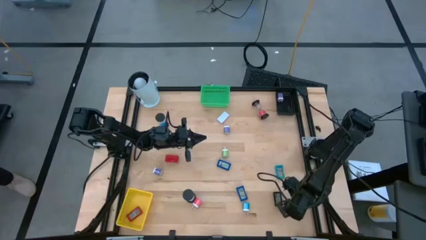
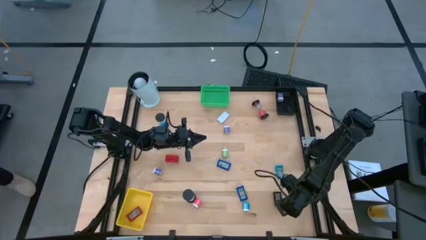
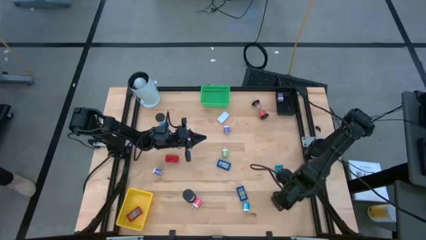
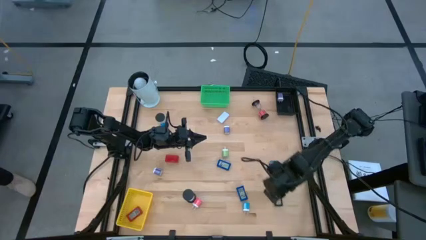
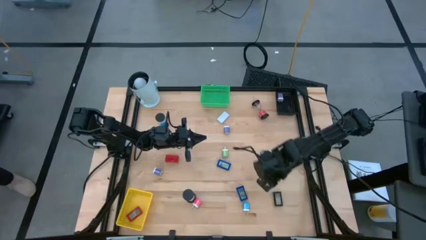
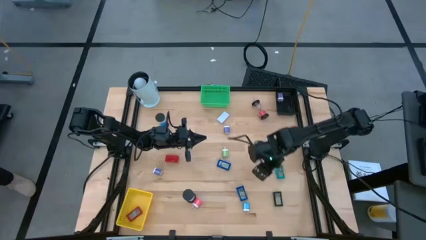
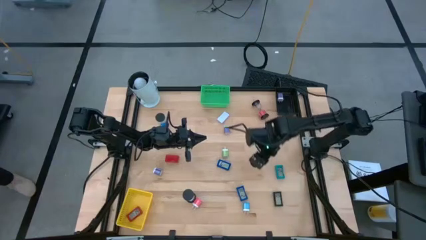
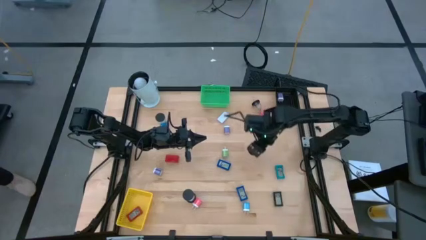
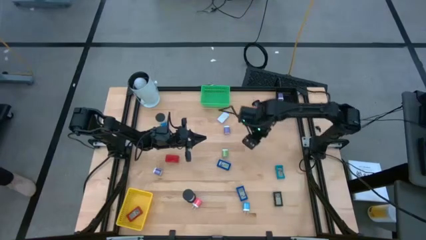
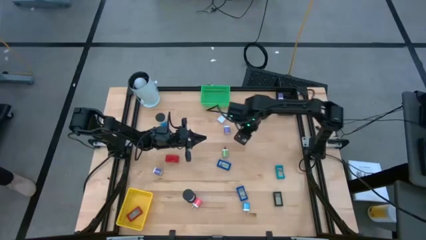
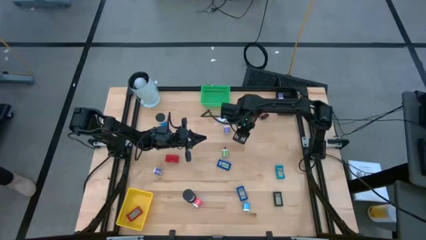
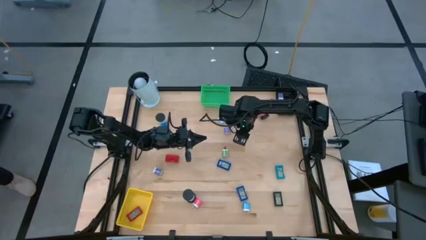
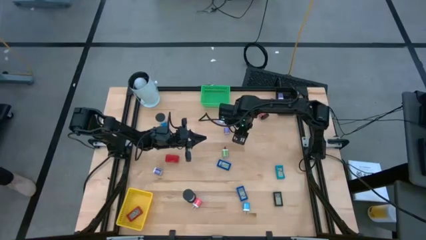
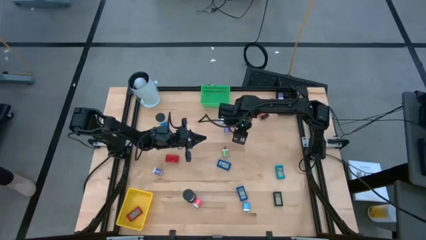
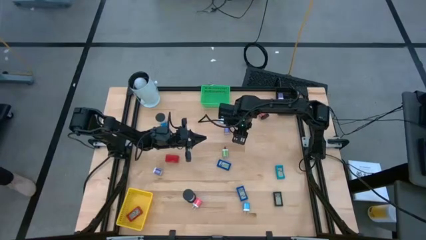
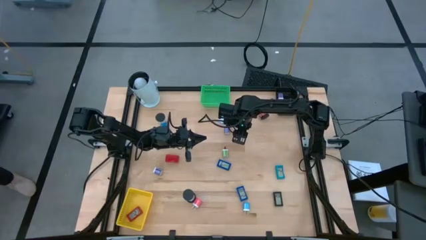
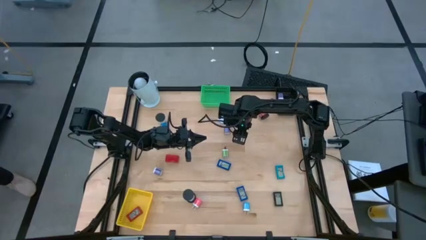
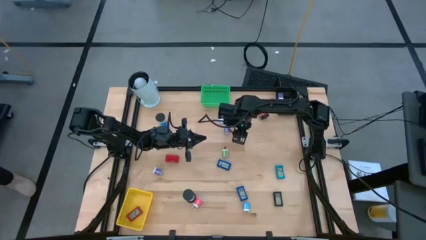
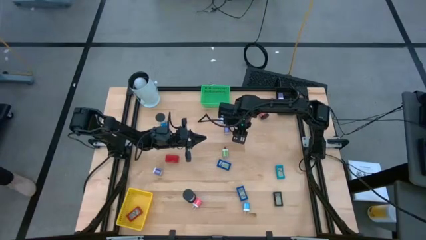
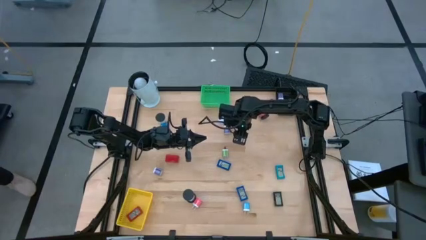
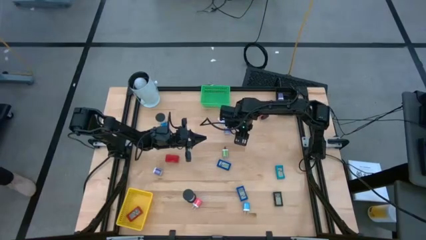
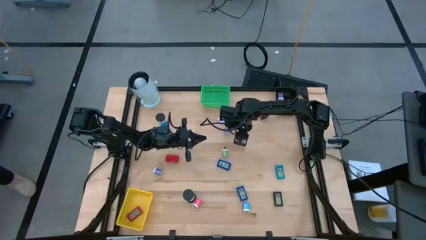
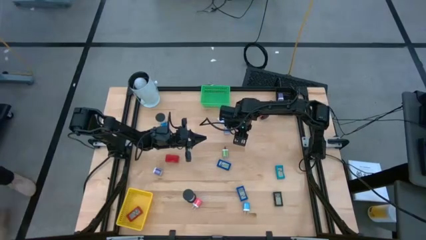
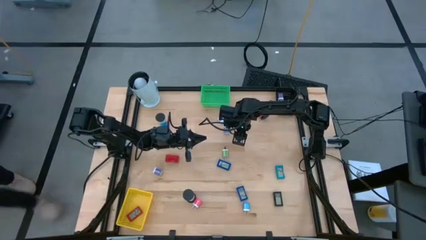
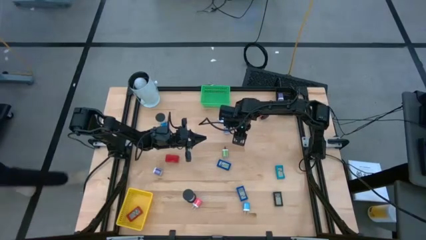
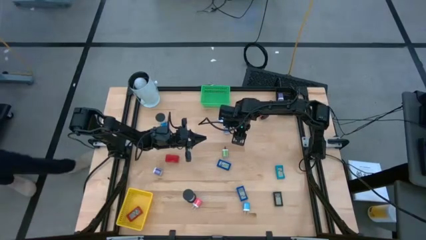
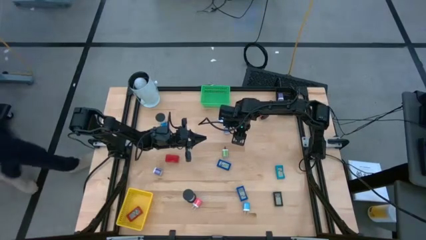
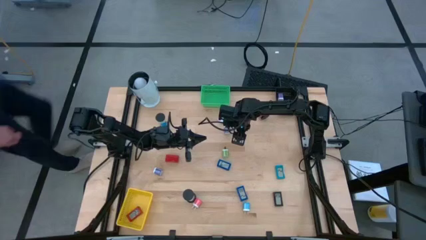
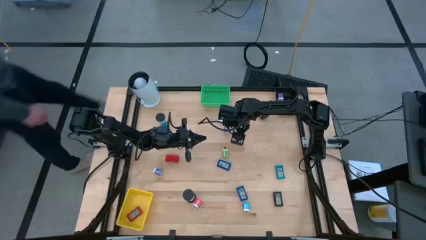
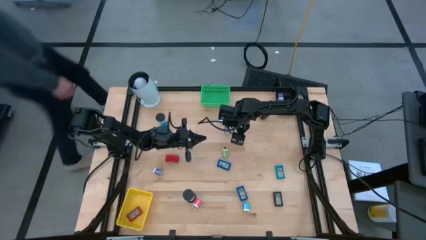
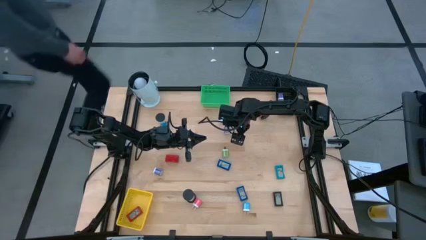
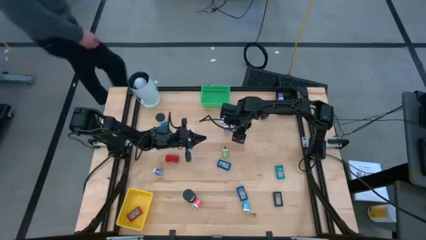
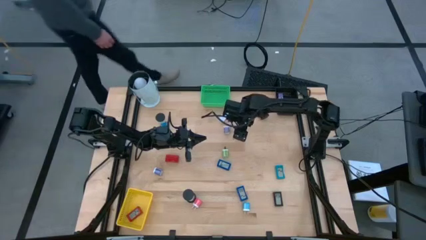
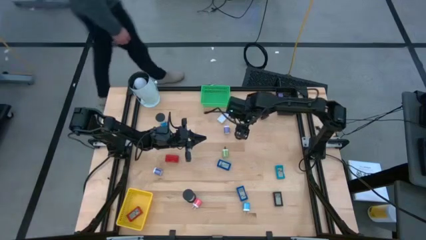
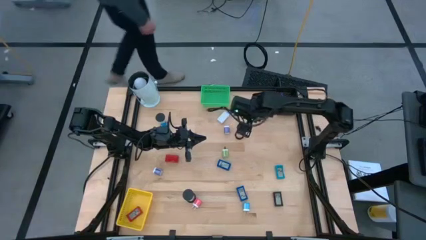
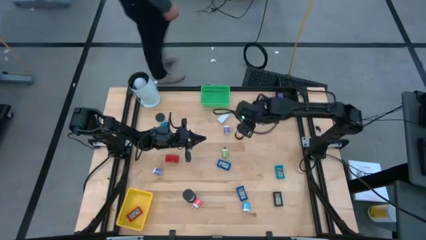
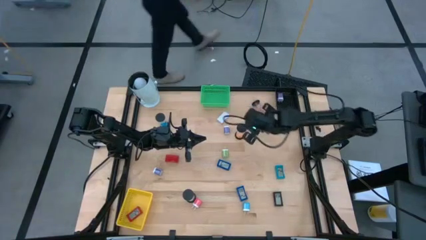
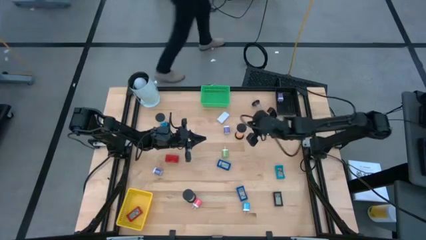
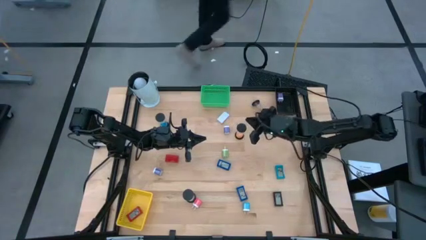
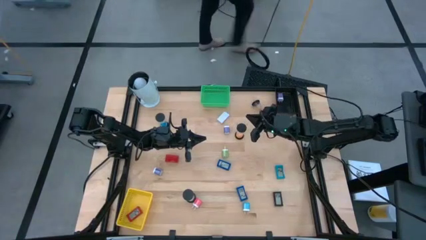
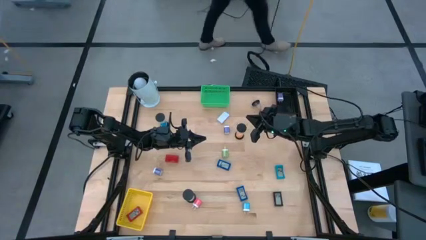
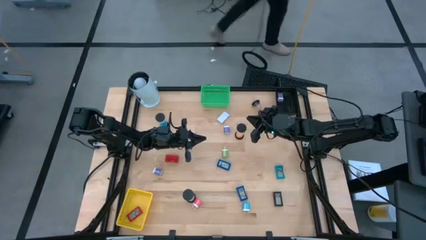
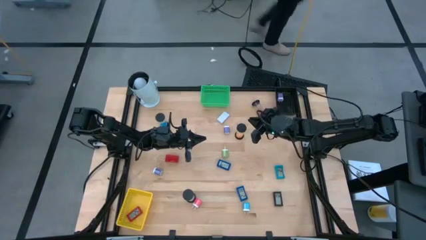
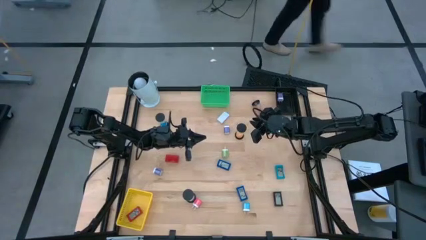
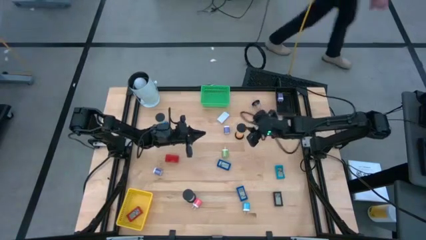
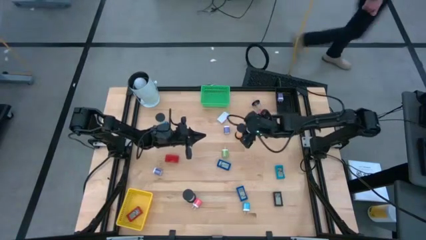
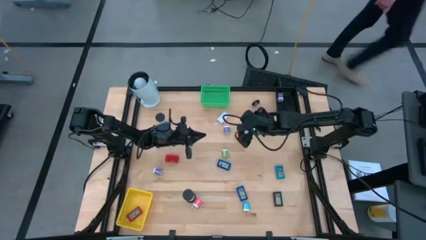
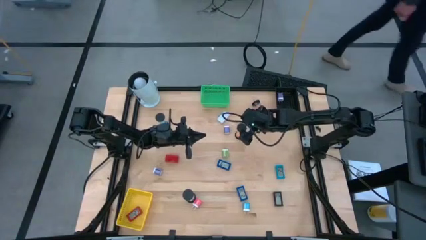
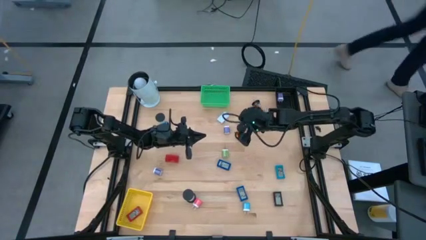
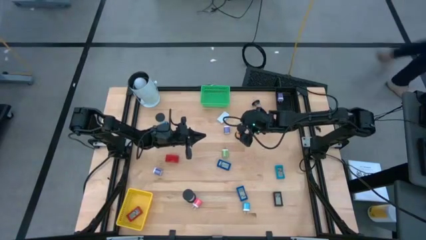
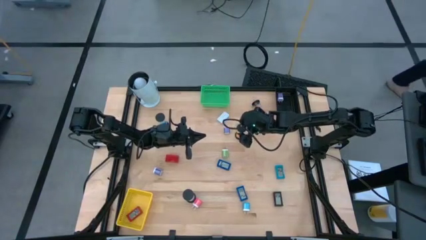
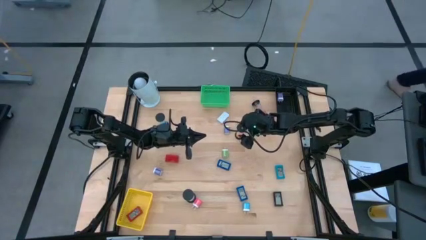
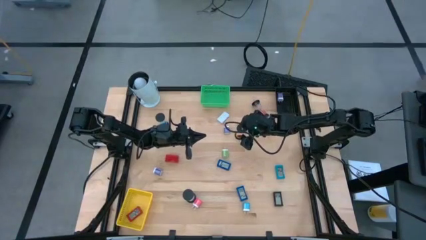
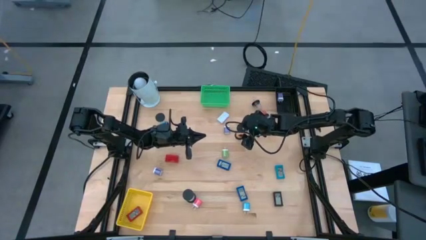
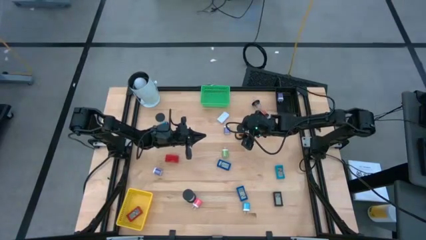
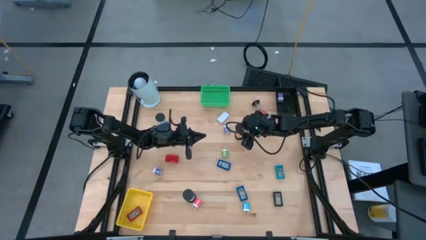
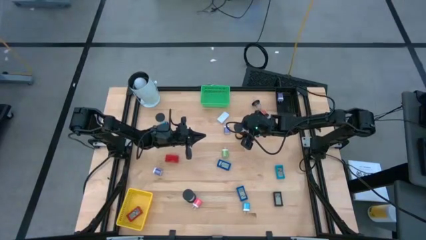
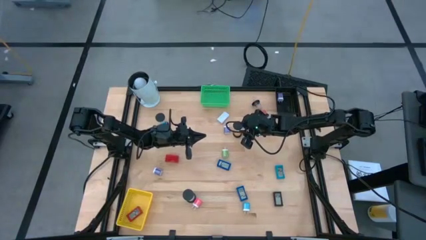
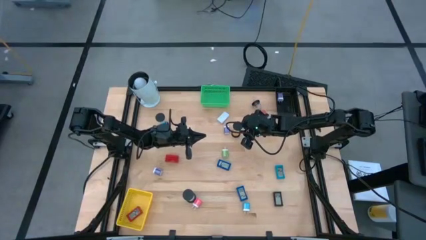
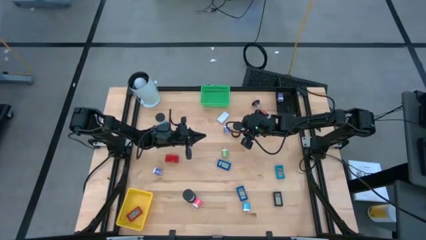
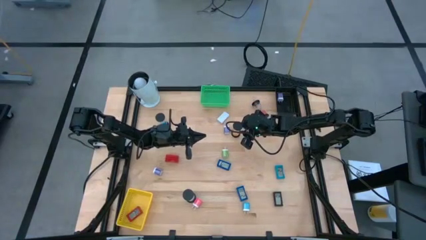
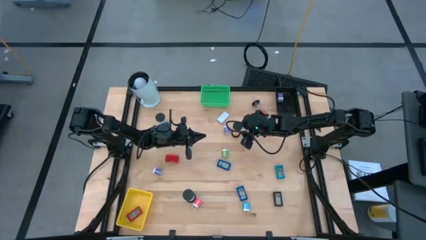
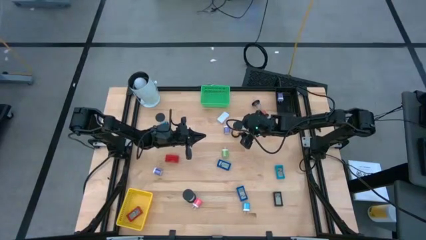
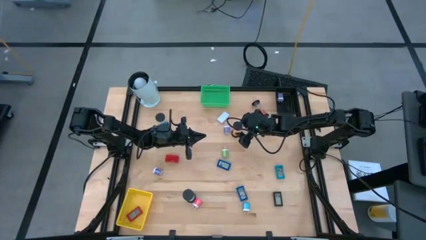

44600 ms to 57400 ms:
Task: Pick & Place Office items
Put the yellow hourglass into the green basket

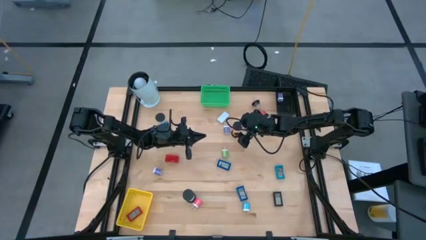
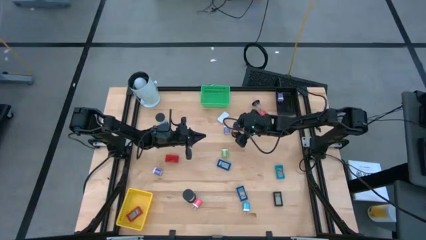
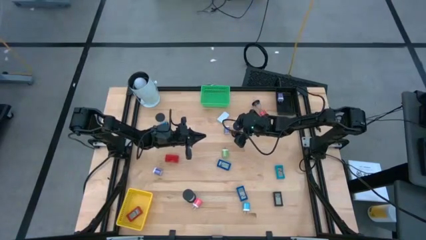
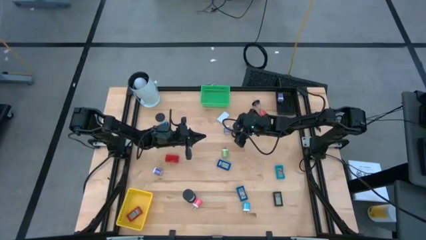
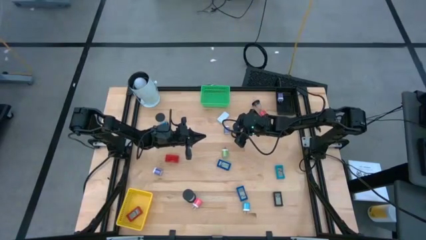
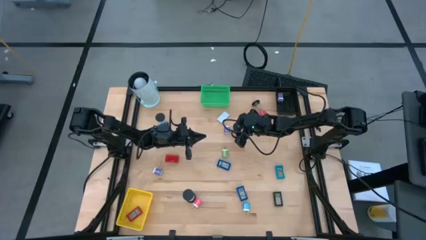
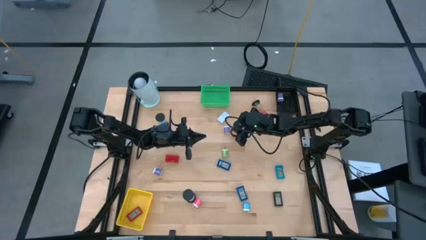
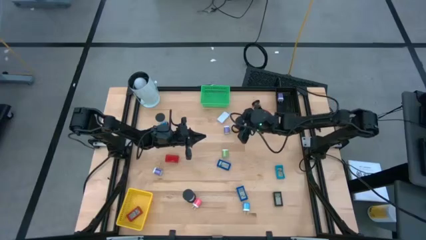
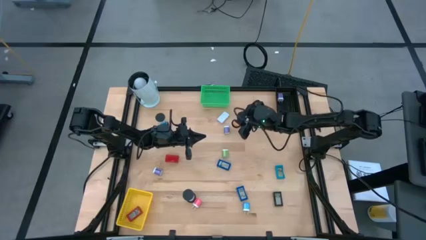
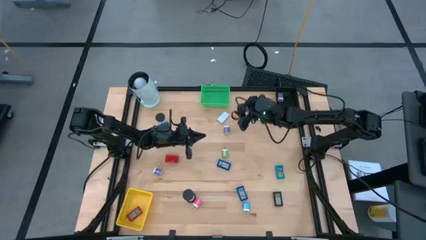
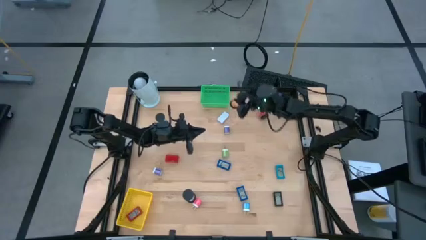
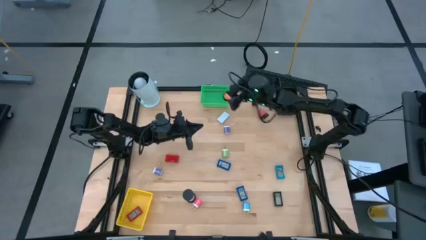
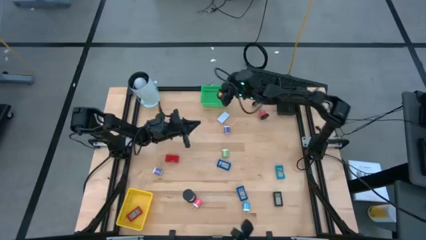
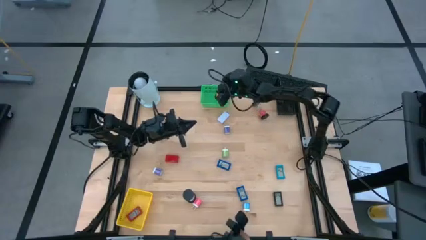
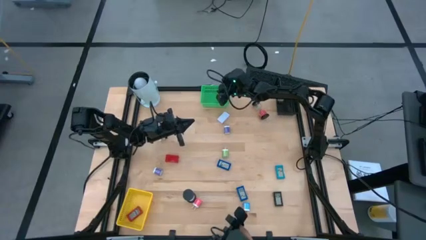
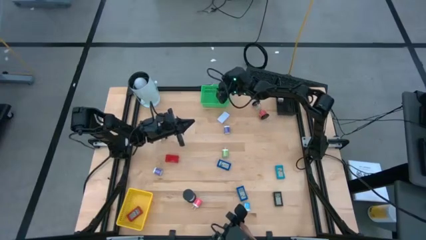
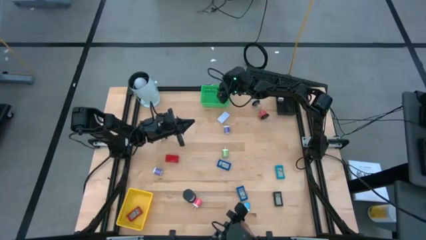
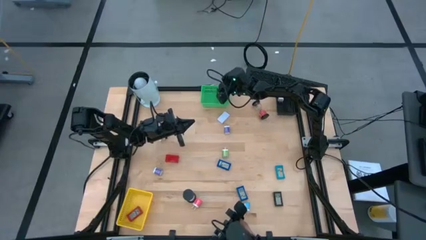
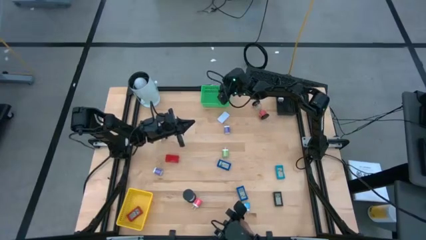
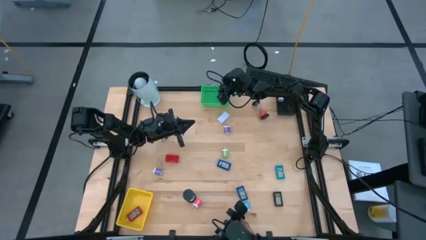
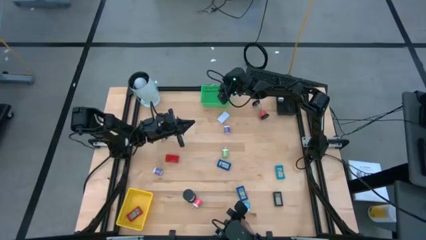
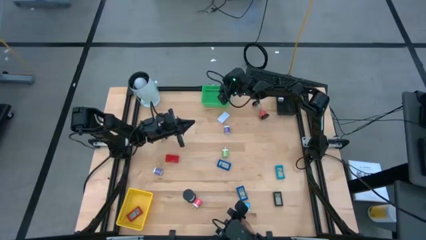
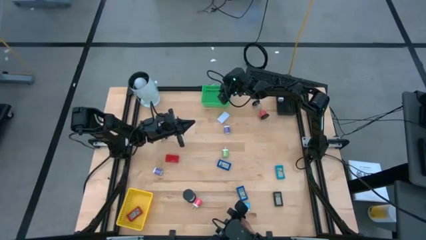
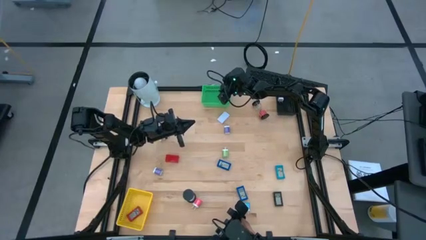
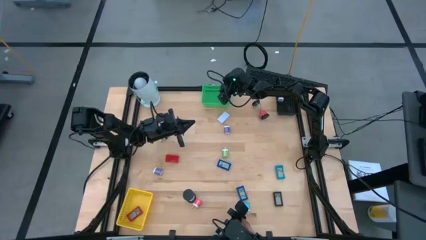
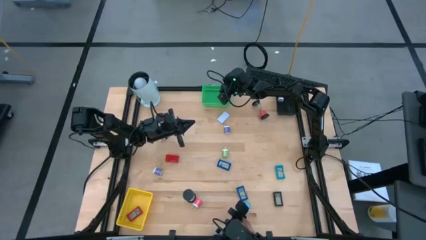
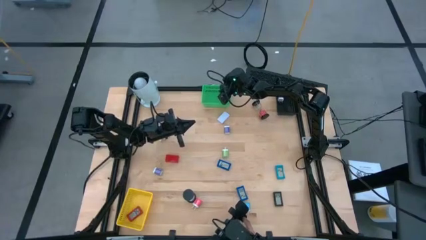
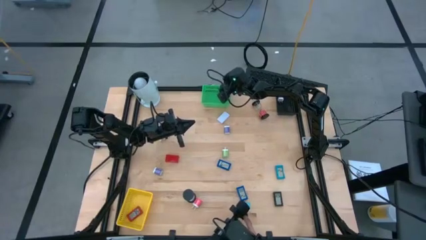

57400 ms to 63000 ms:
Put the yellow hourglass into the green basket
